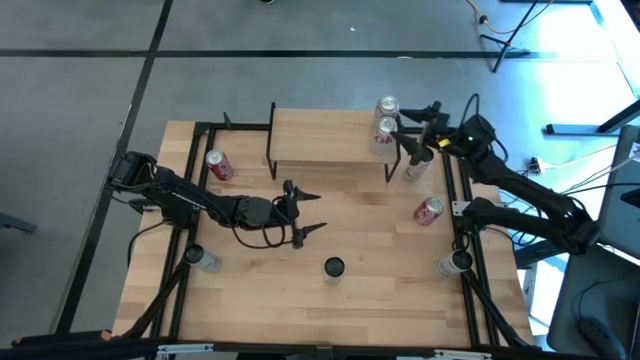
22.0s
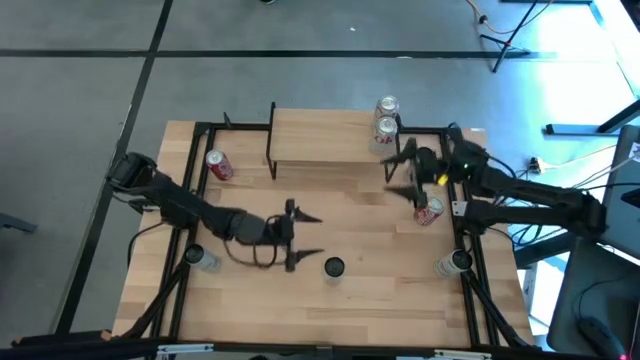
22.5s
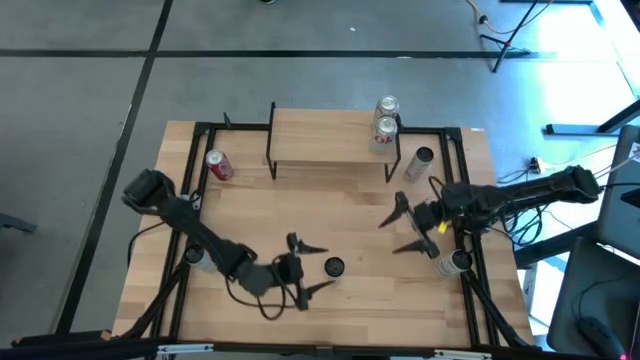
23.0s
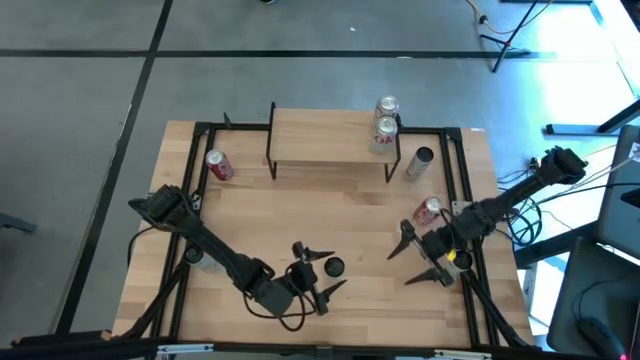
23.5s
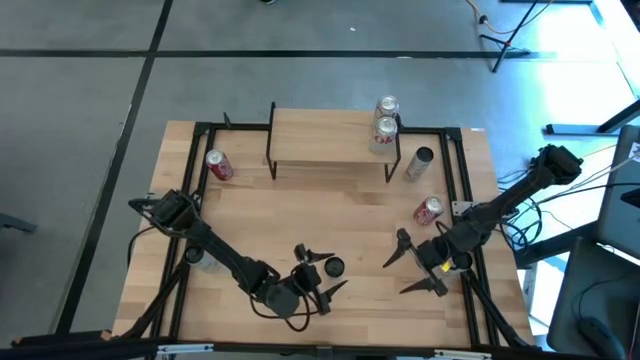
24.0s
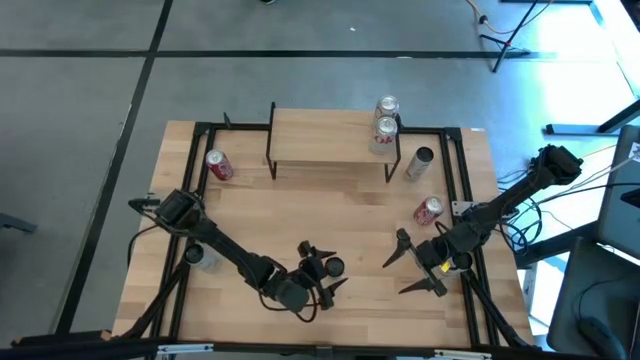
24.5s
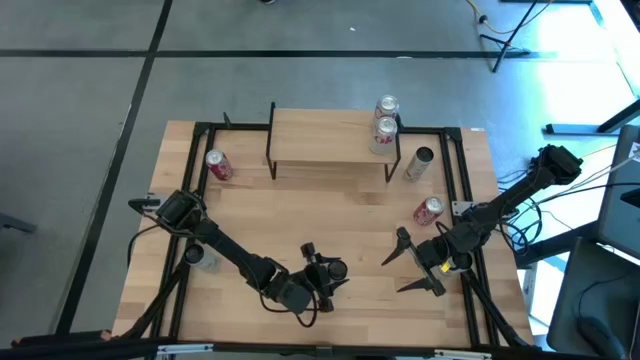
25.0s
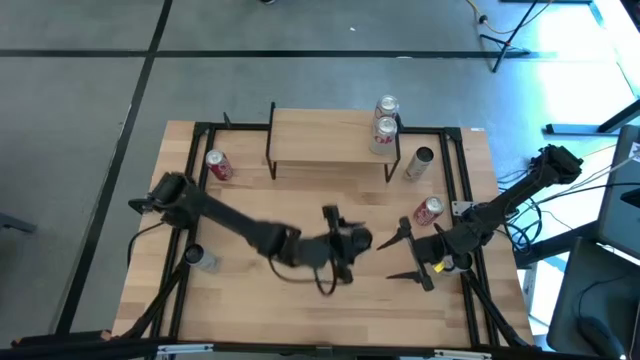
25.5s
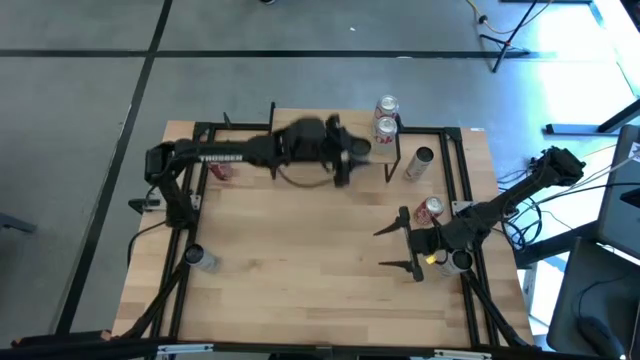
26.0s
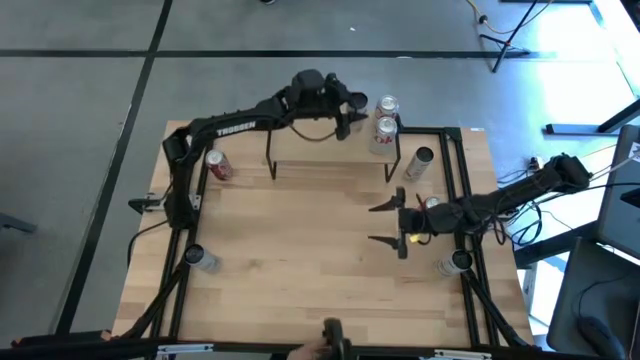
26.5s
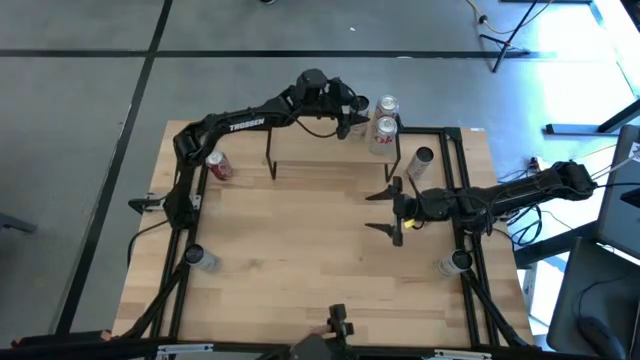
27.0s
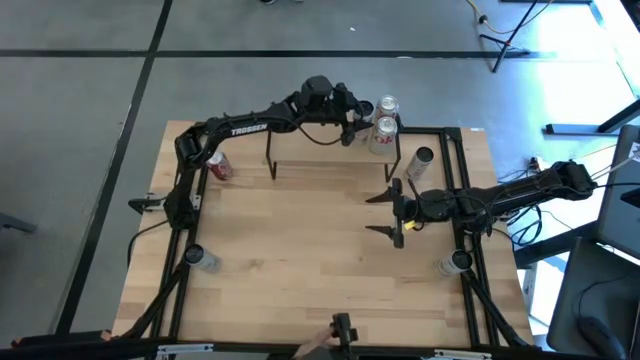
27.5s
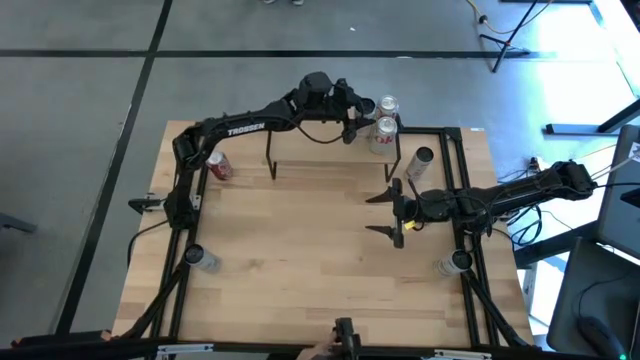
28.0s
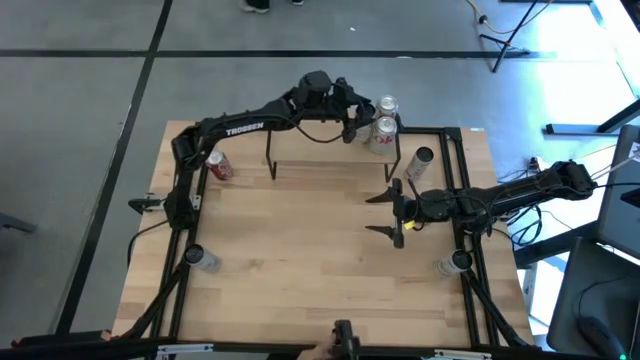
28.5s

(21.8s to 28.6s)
Task: Place canned beverage on shelf
Put the bottom white-pink soda can on the shelf

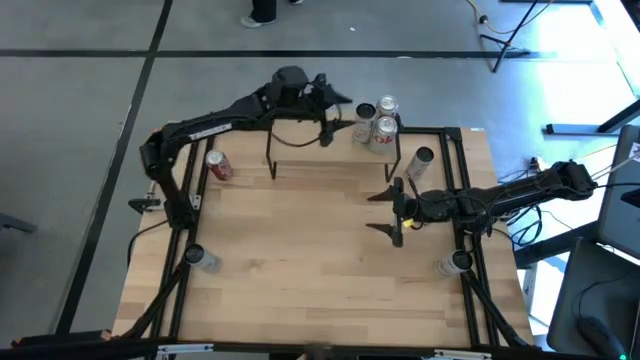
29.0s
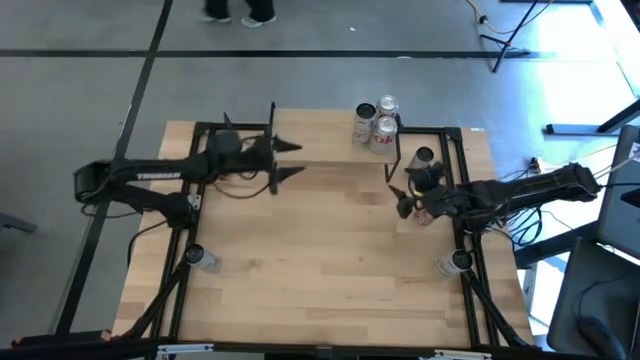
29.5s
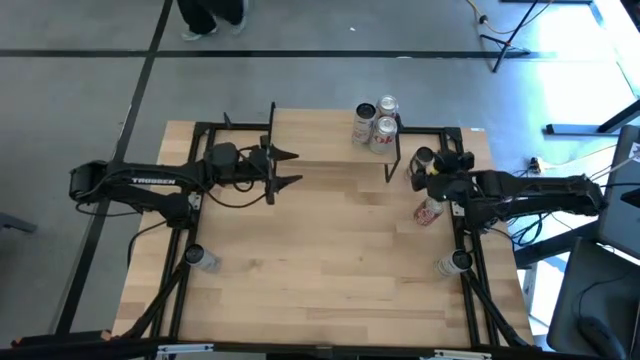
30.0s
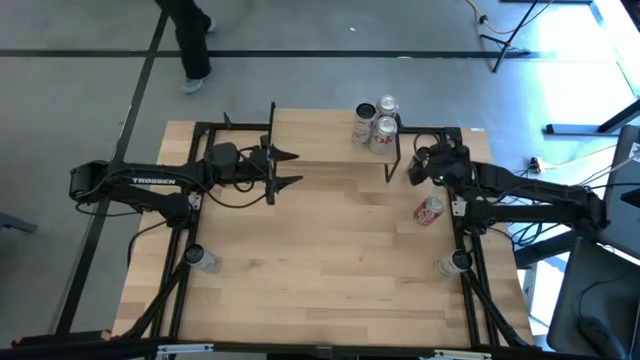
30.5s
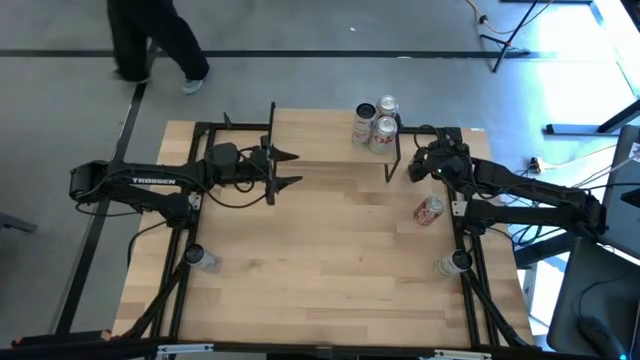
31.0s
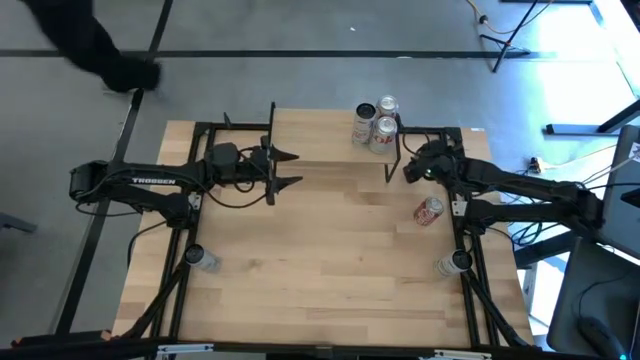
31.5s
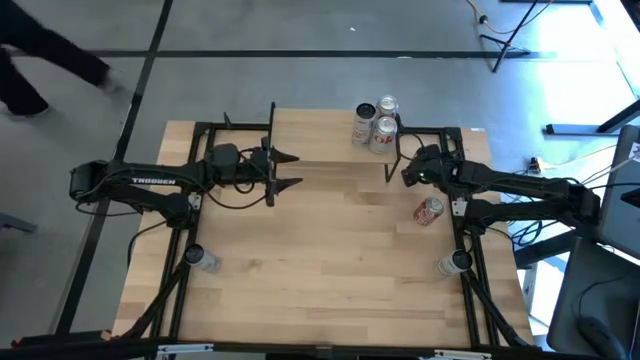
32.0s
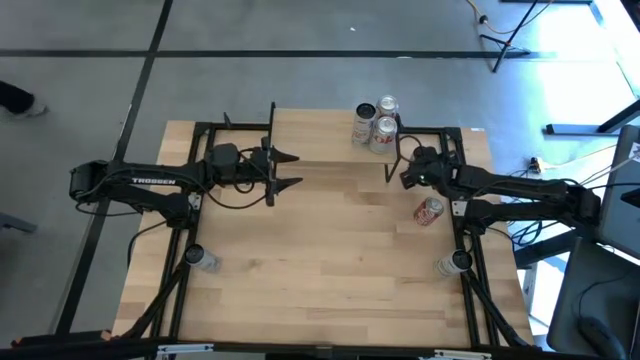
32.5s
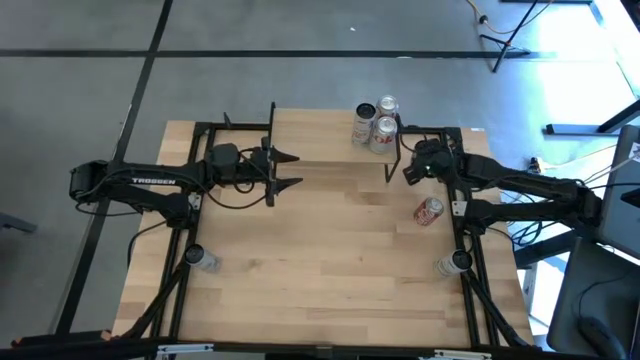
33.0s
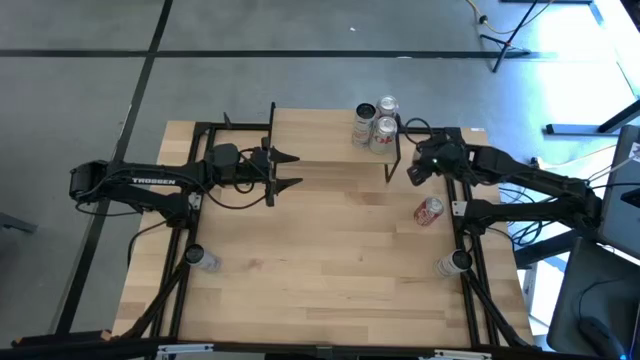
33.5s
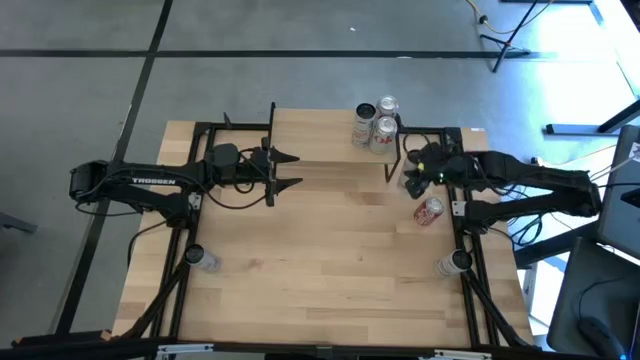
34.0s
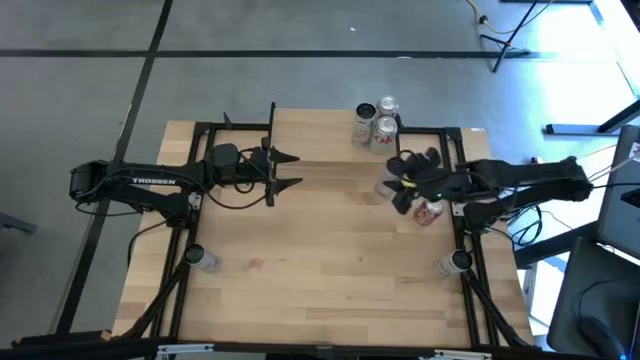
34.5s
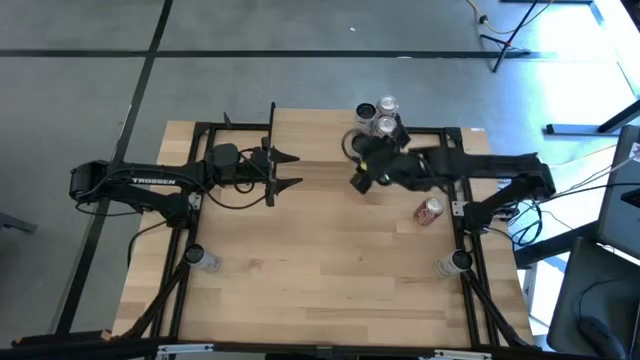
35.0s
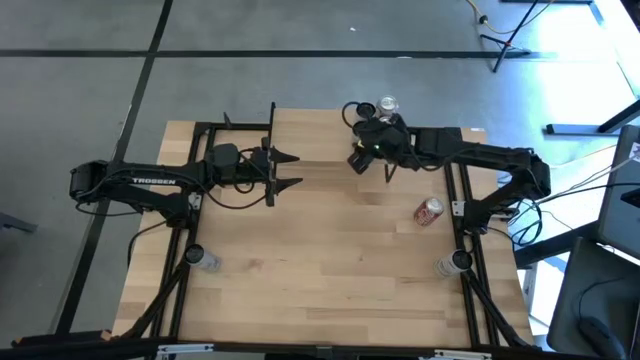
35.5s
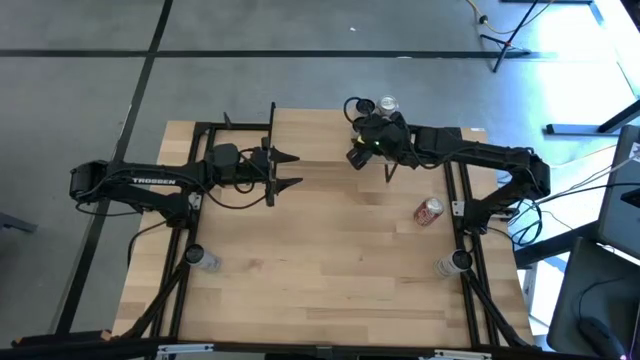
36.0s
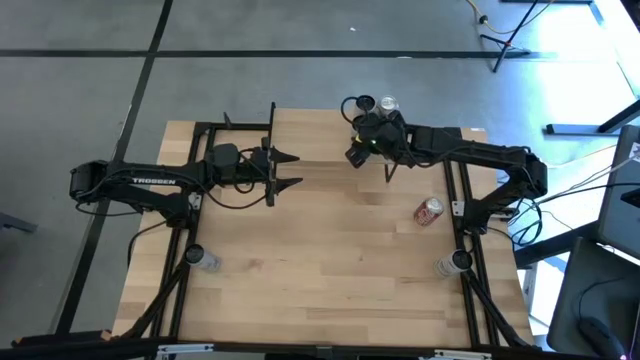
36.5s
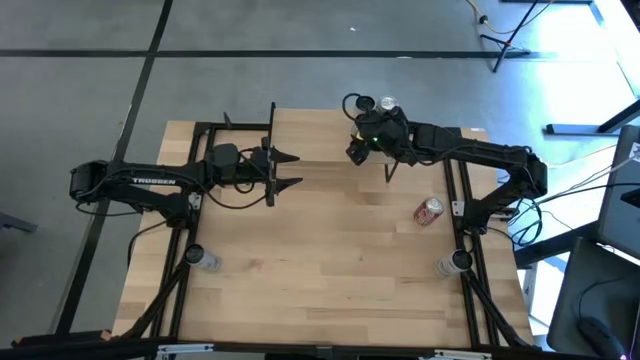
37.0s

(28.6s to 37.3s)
Put the white-pink soda can on the shelf aligned with the other white-pink soda can

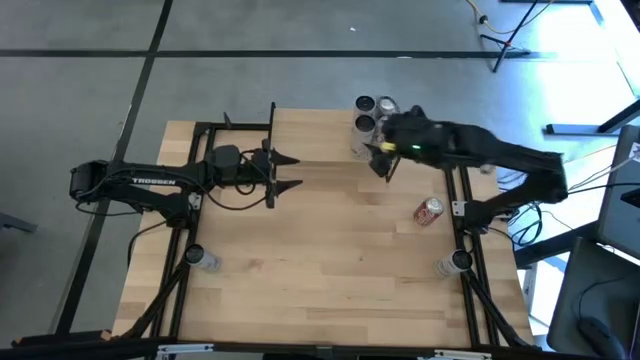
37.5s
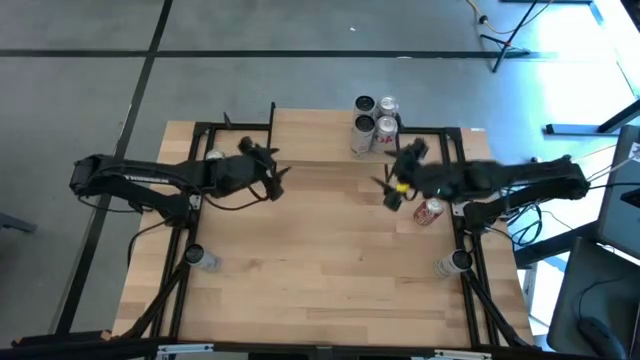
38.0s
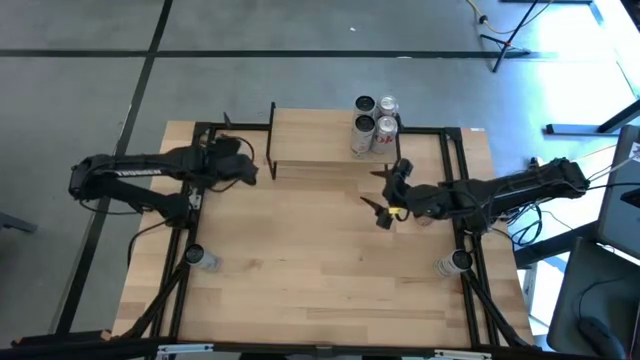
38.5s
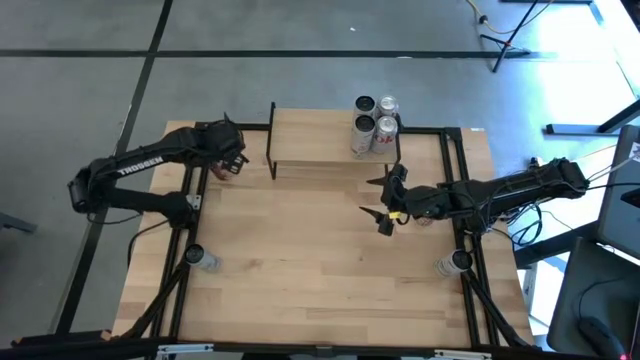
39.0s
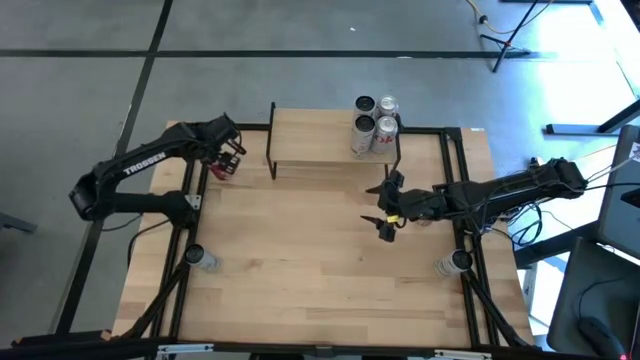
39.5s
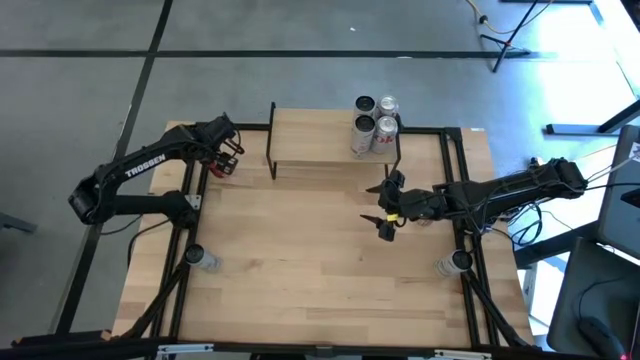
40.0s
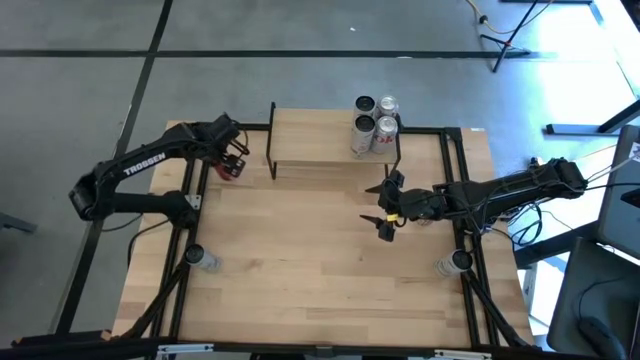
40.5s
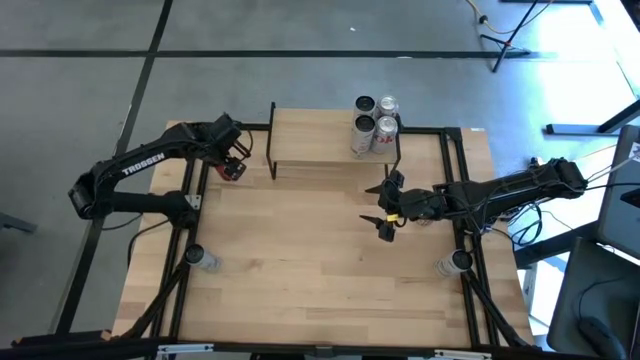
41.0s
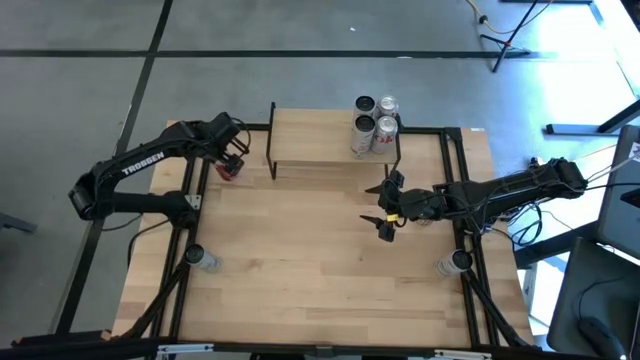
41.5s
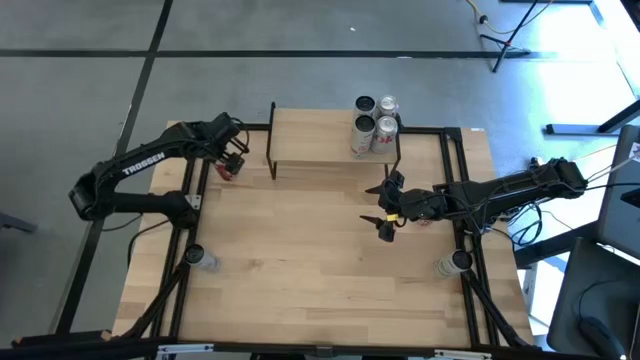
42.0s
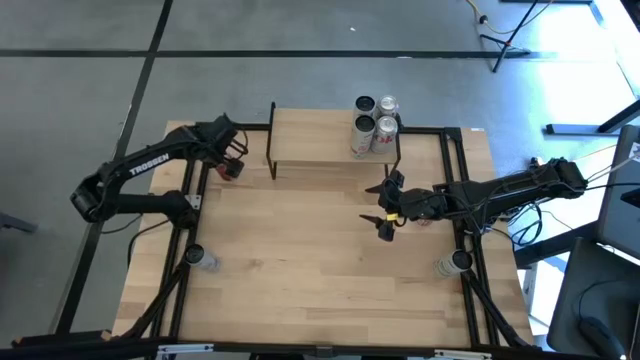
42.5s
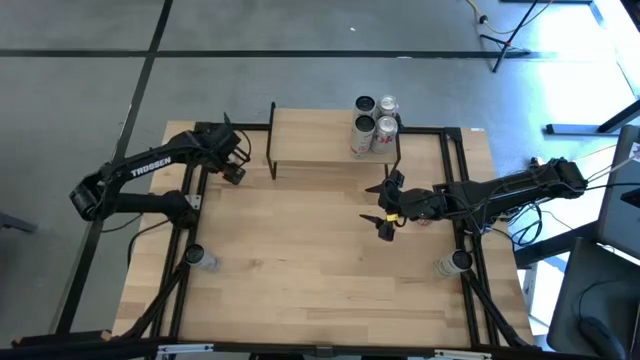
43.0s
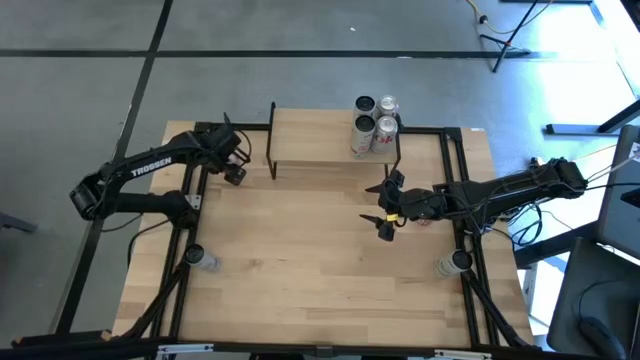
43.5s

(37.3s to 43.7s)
Put the left black-red soda can on the shelf
